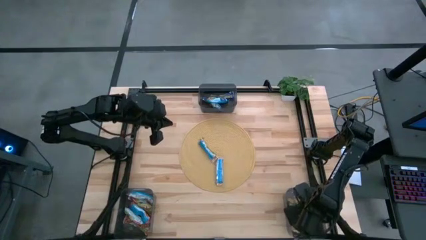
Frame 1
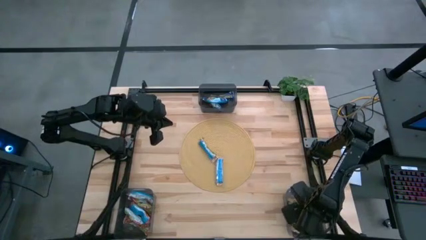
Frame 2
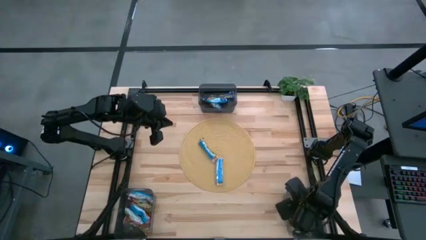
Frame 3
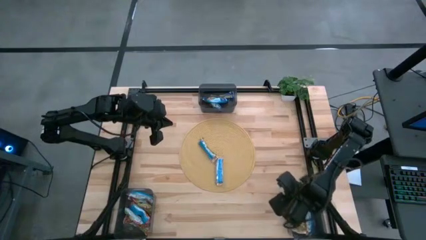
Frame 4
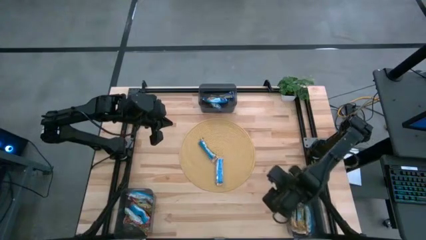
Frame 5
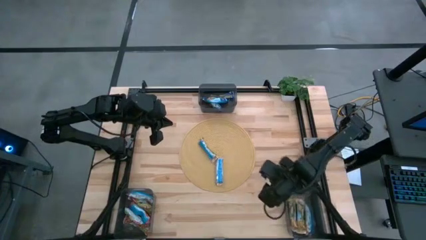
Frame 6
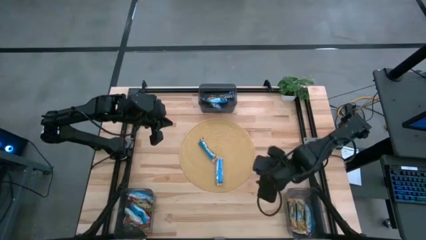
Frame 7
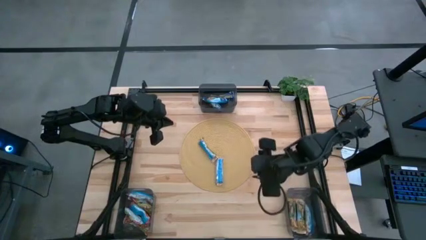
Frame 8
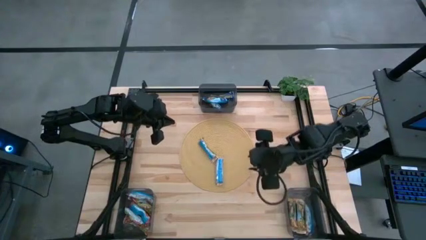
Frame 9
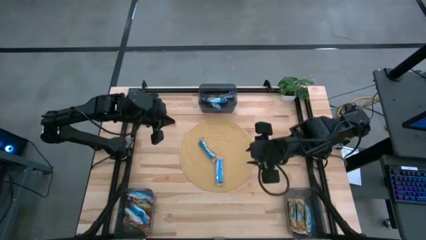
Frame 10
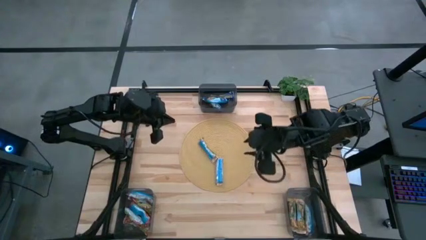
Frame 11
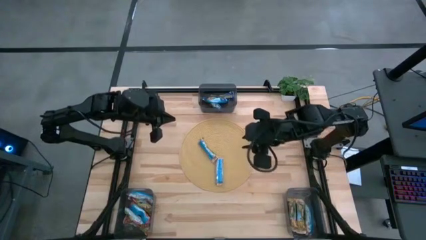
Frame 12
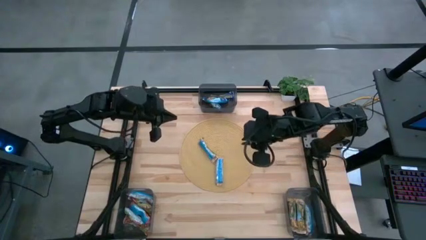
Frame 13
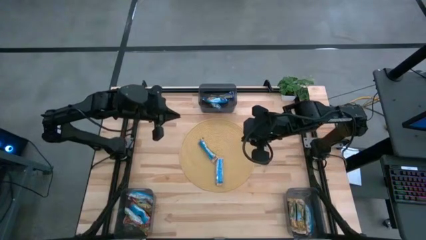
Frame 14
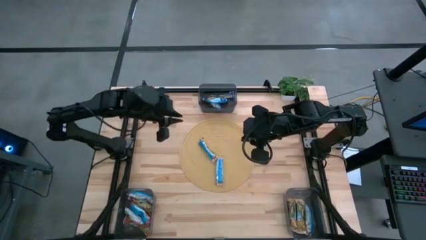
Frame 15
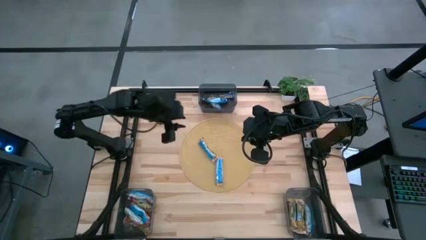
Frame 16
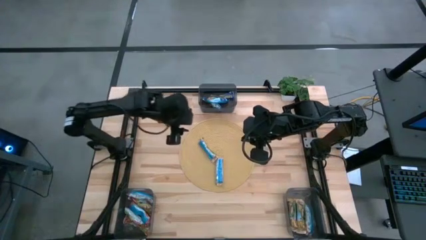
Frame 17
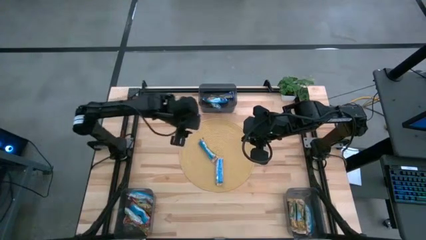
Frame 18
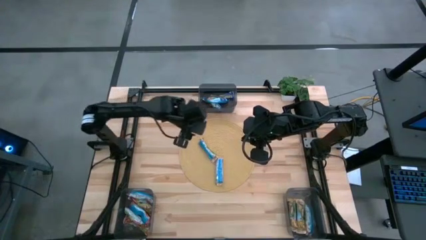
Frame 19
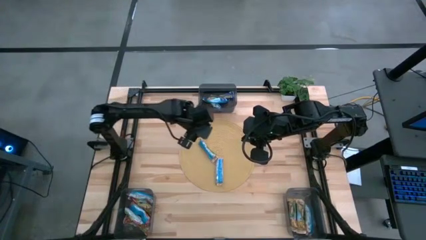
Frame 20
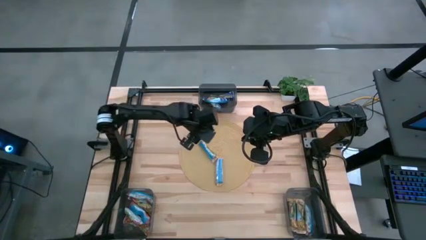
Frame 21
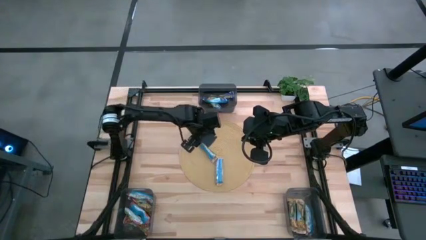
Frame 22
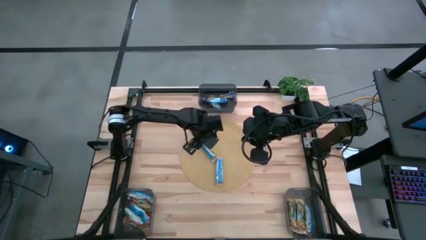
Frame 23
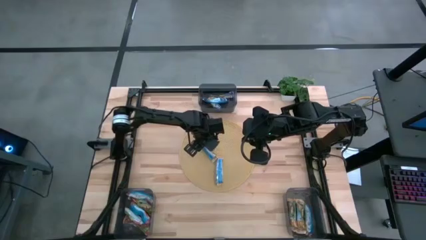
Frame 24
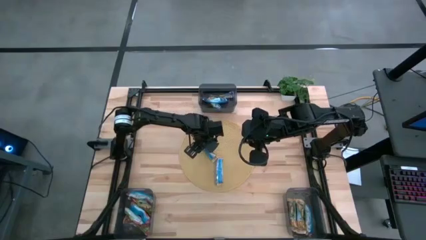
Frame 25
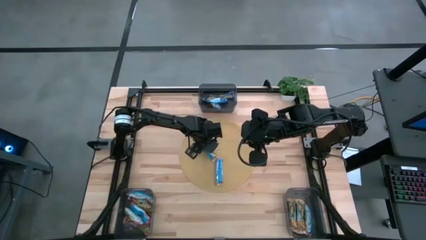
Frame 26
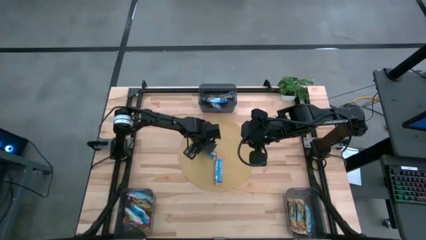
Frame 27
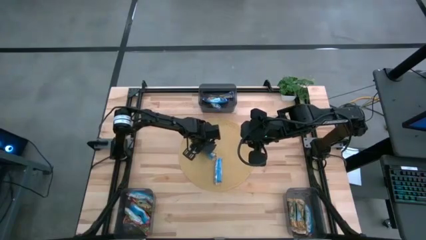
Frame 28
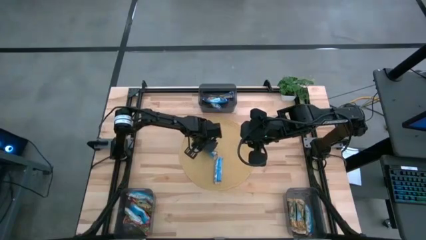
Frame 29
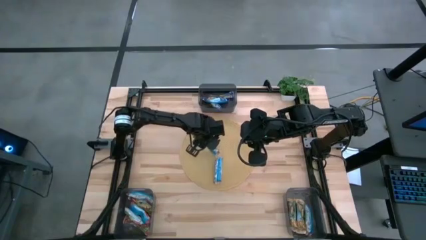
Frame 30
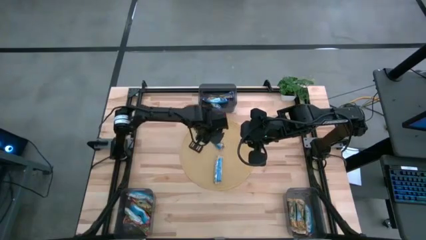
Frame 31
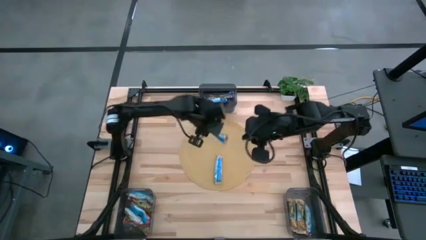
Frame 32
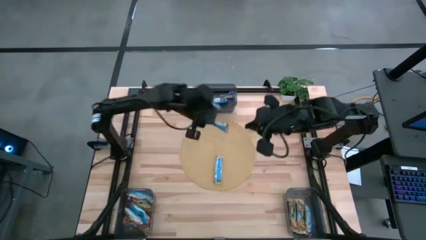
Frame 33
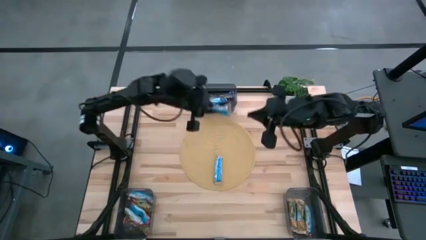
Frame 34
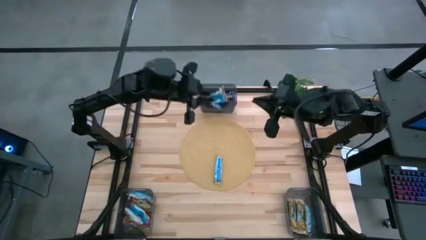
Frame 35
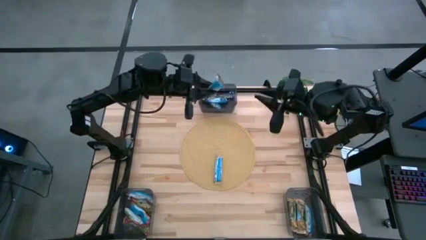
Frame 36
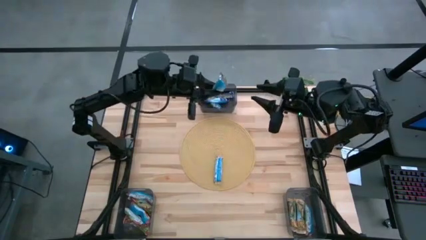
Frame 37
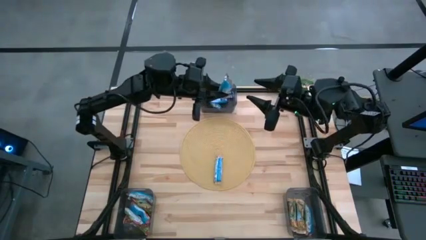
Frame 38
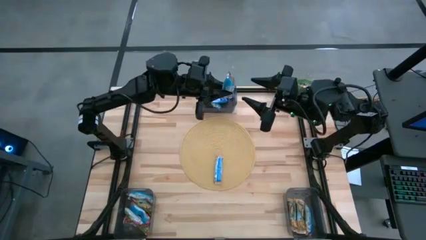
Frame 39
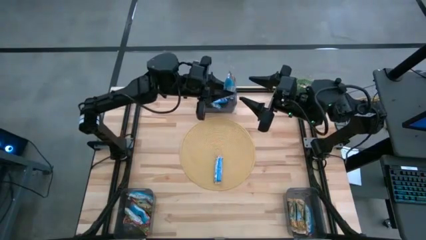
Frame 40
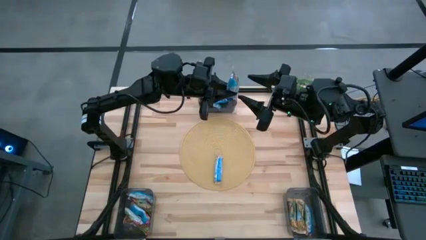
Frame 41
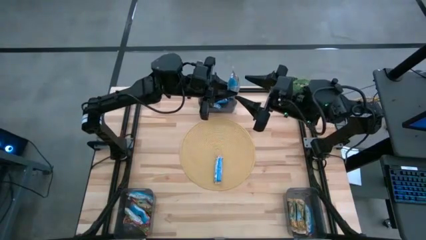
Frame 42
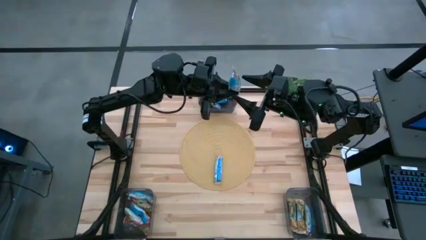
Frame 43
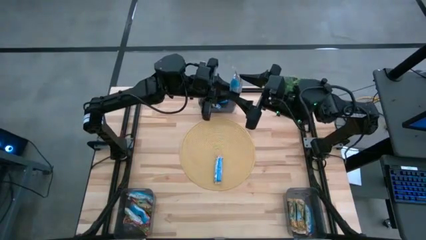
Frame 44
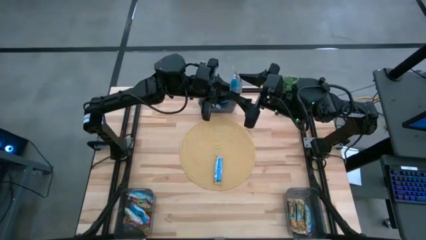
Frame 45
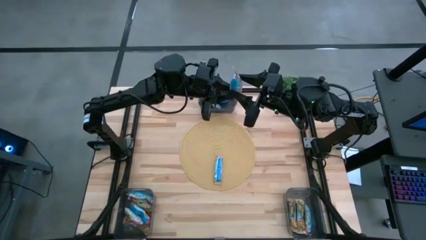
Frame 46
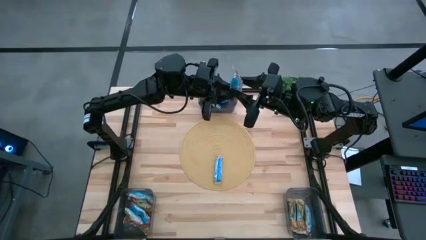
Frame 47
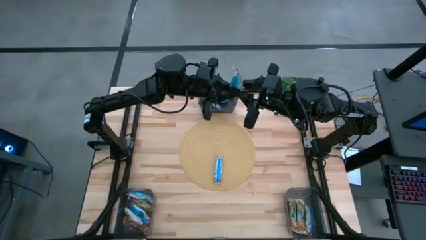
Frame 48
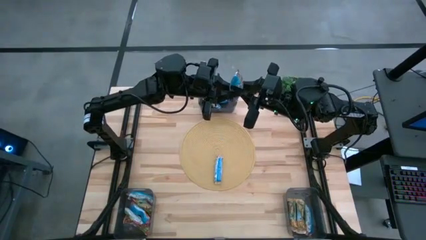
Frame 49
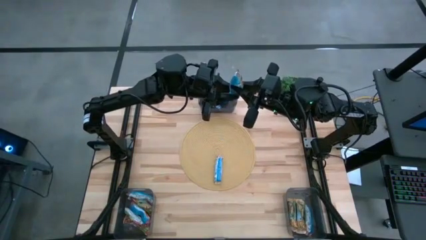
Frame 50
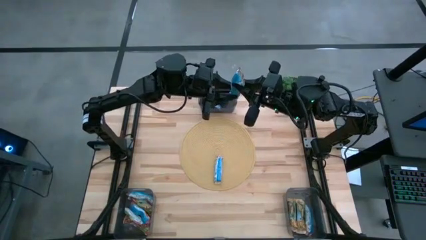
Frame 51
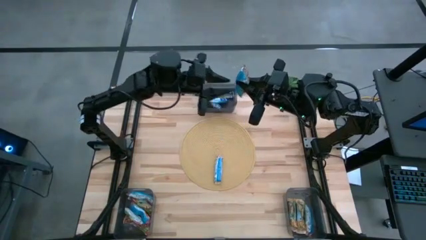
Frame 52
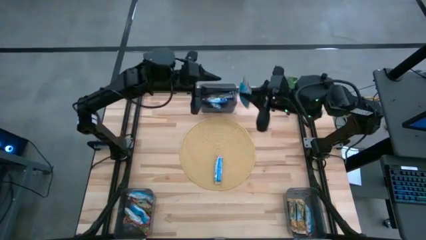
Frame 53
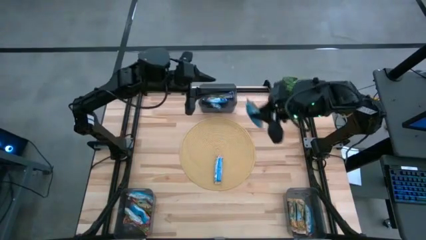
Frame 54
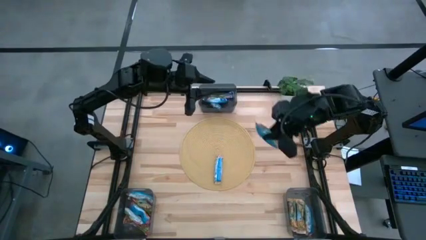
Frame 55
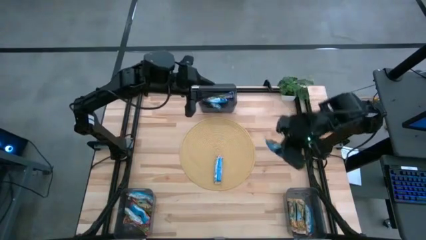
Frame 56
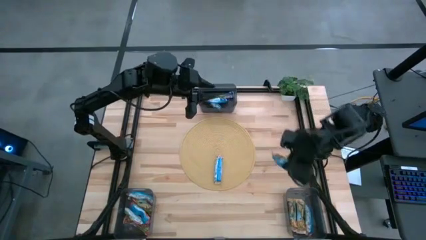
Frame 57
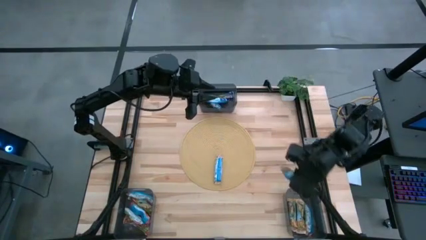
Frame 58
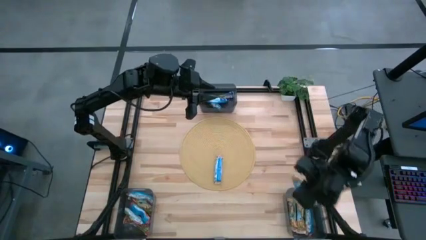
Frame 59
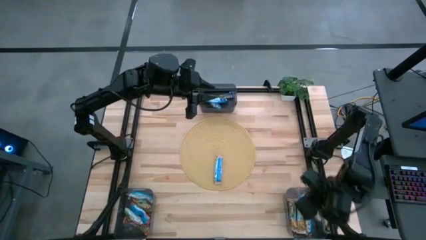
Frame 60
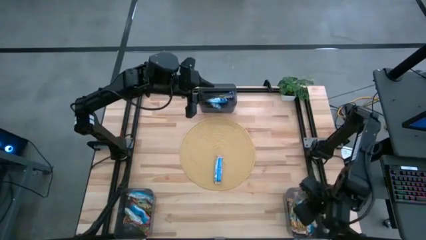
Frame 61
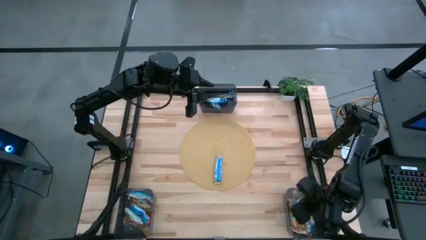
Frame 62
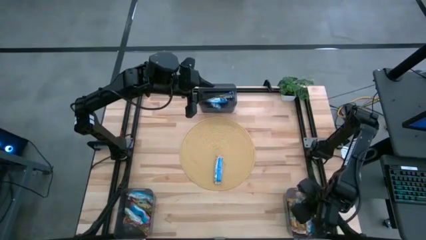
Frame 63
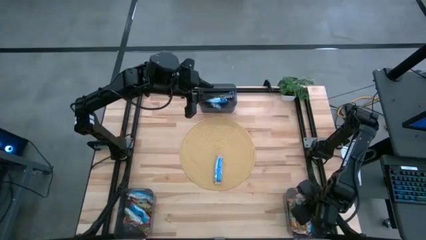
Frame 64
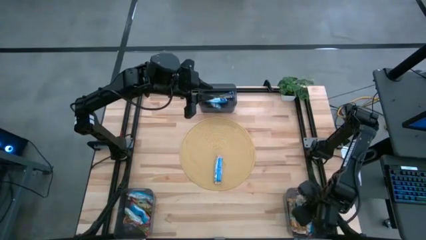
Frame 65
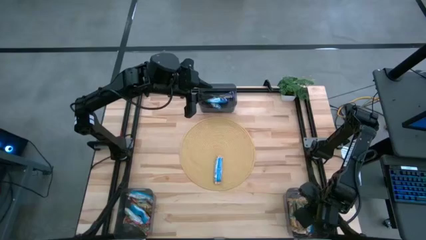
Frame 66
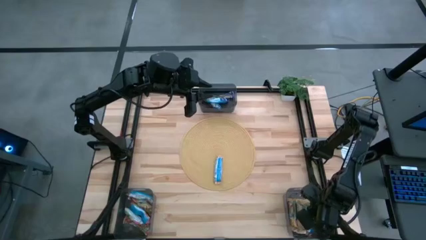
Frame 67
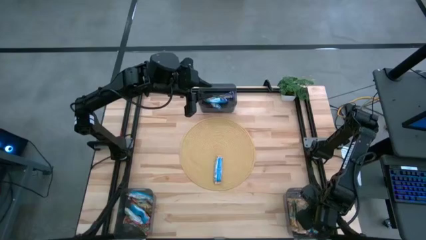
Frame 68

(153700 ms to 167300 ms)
Task: Pick and place Granola Bars by type
Put the yellow granola bar into the right black bin

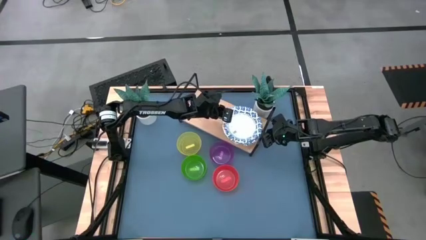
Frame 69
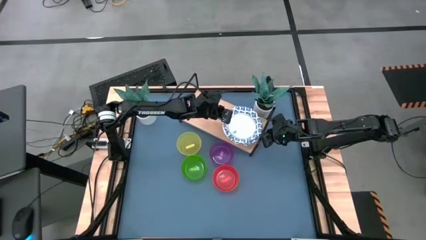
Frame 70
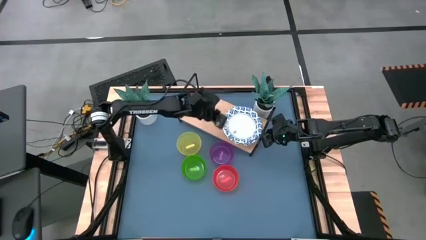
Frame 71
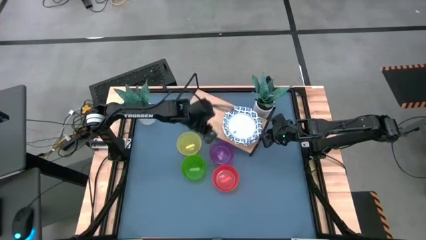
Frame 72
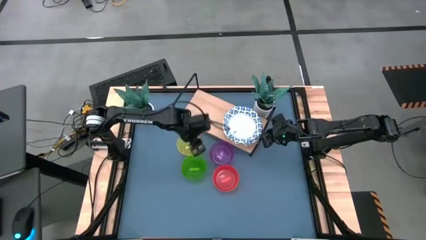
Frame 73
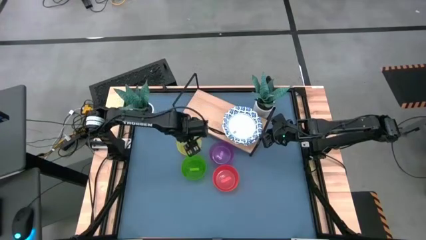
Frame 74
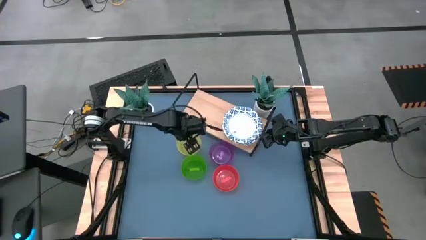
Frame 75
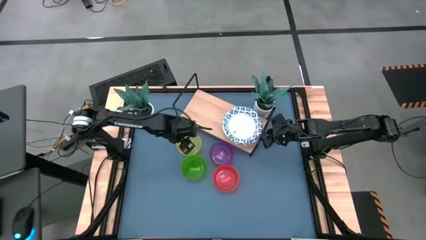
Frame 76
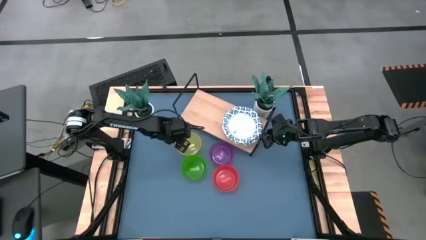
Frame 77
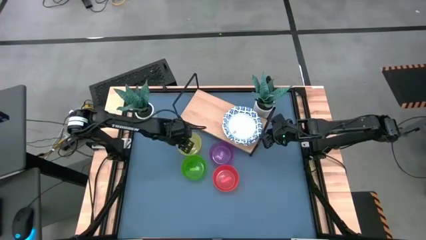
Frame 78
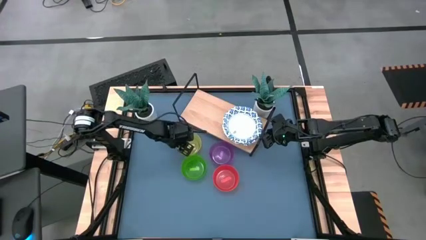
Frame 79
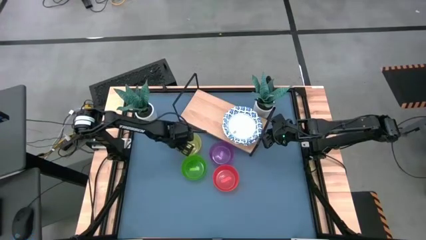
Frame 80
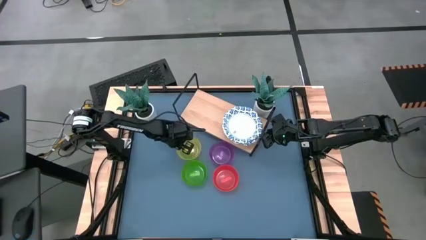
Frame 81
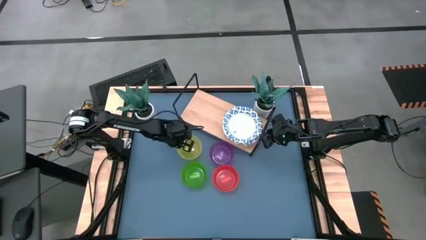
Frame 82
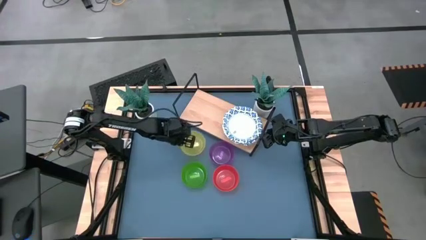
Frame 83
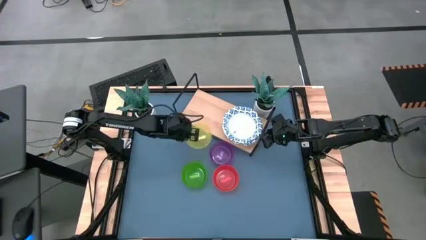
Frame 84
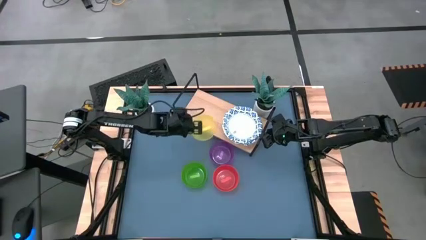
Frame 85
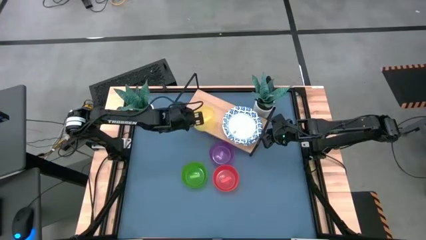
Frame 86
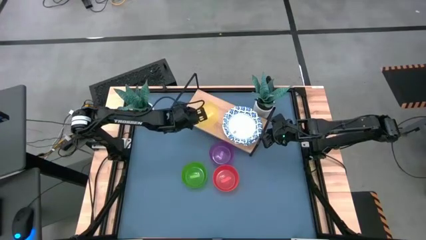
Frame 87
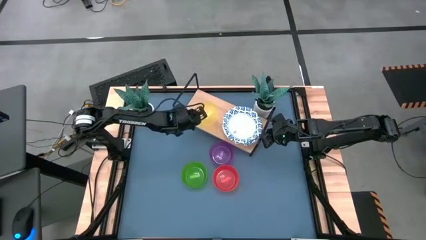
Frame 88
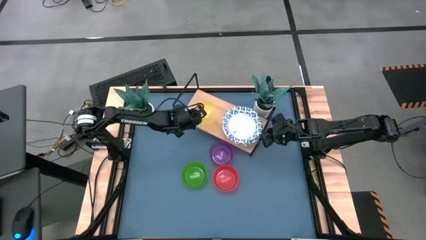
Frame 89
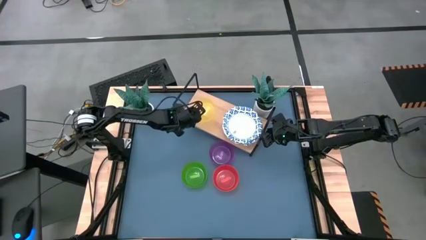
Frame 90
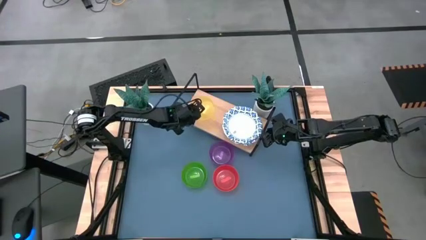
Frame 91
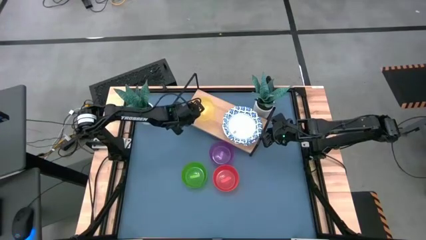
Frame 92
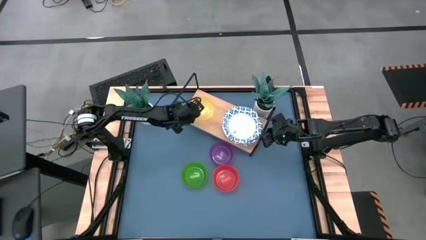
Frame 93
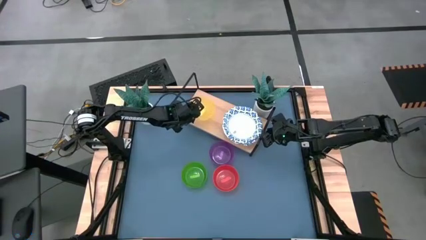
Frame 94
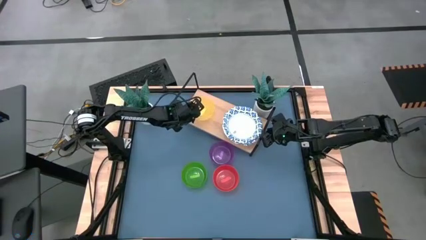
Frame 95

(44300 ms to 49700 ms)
Task: Place and stack bowls onto a shelf
Put the yellow bowl on the shelf
